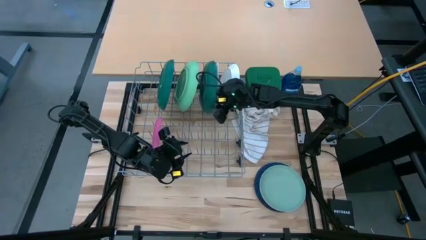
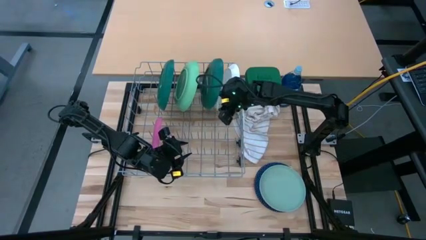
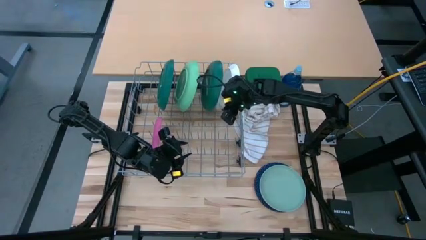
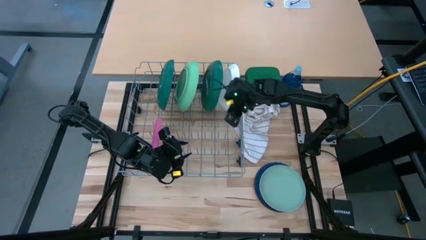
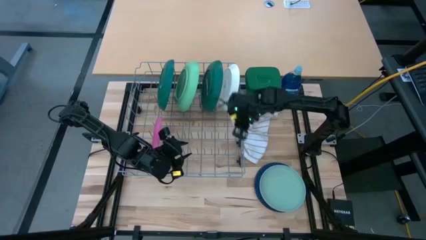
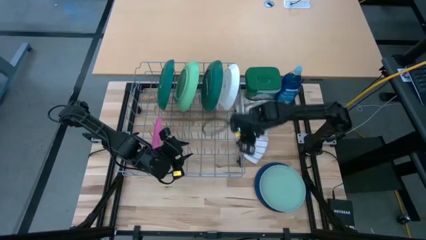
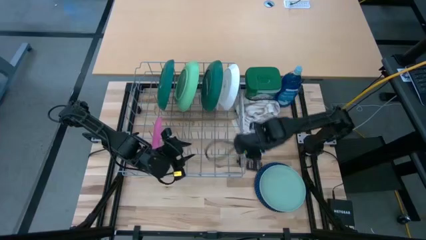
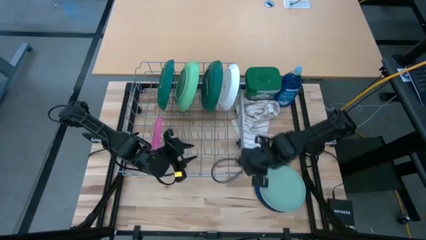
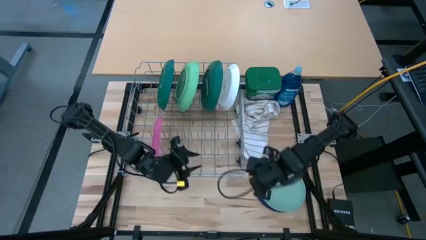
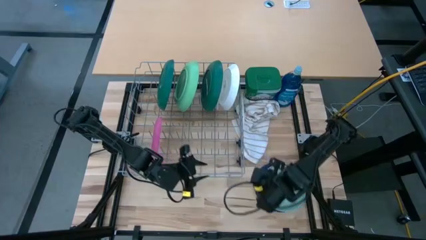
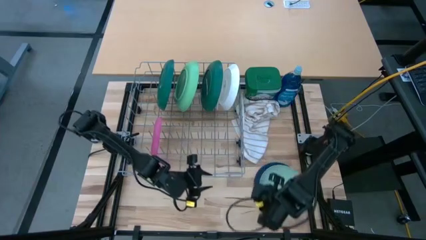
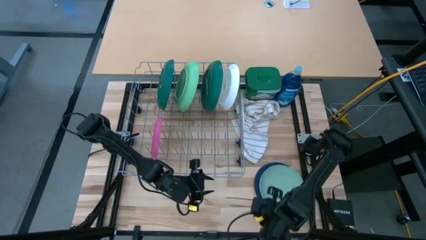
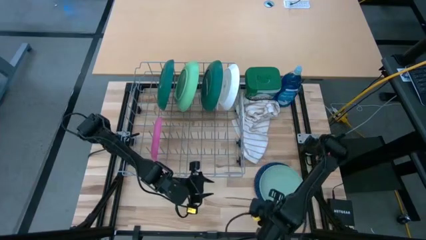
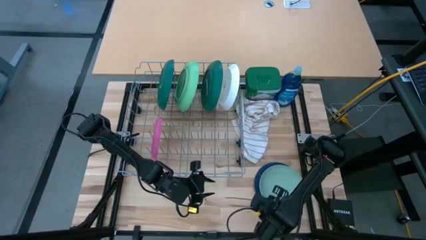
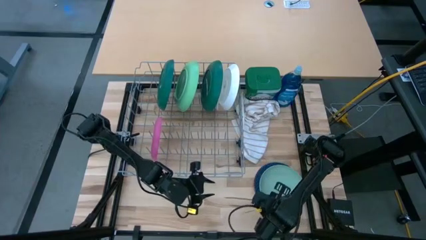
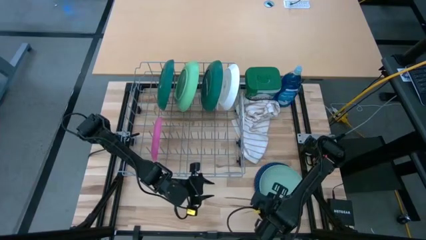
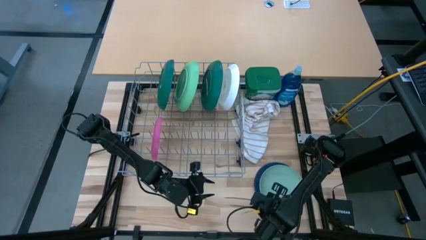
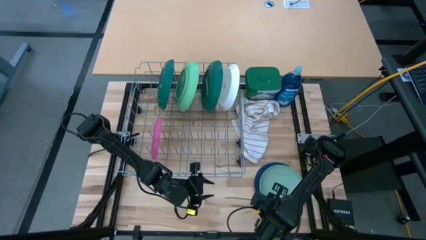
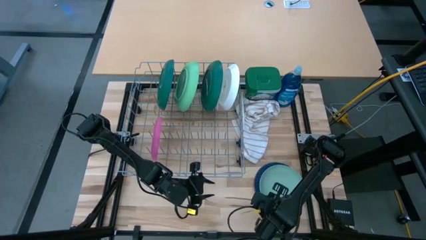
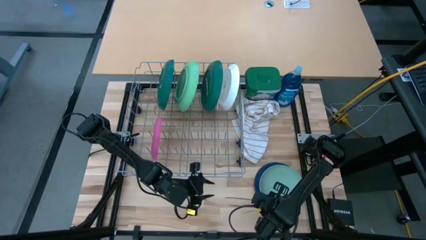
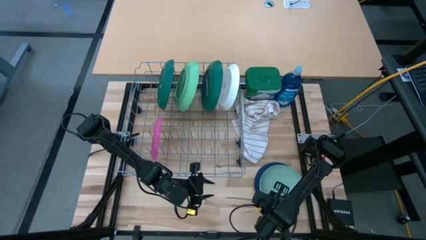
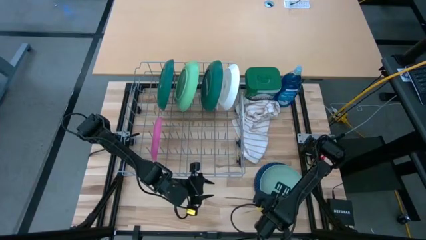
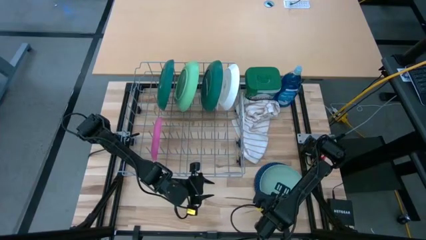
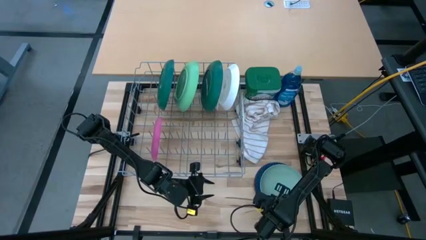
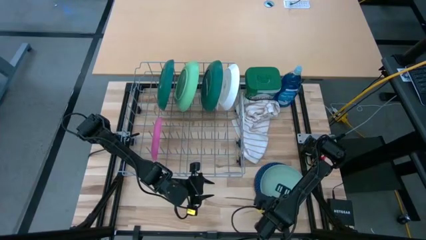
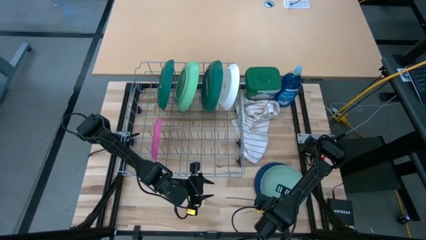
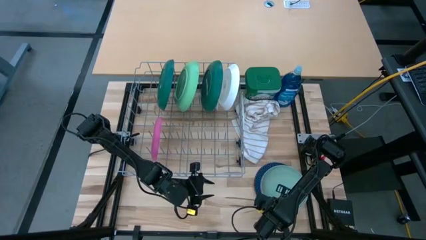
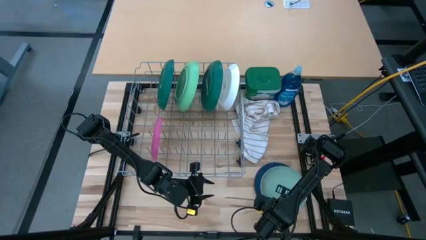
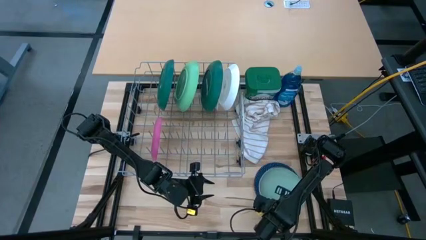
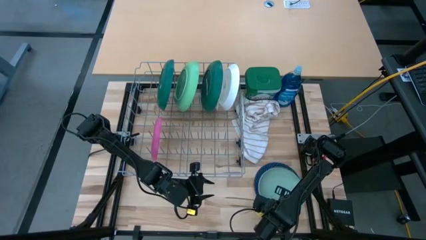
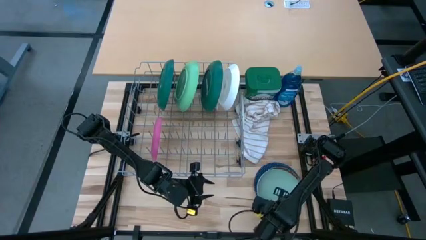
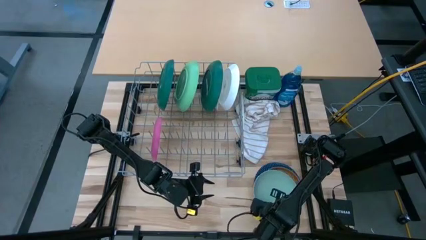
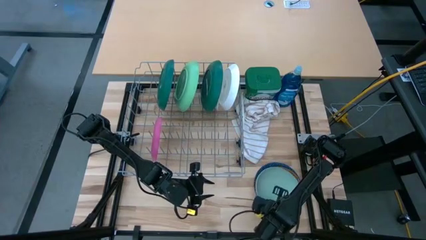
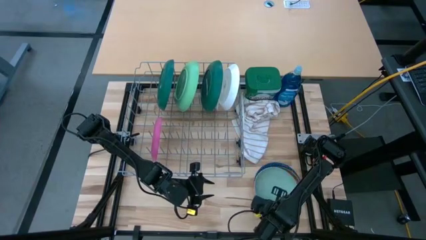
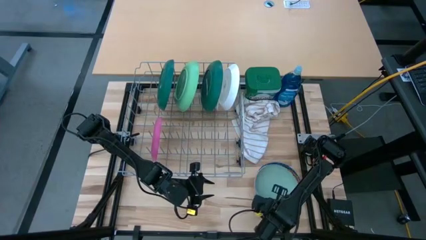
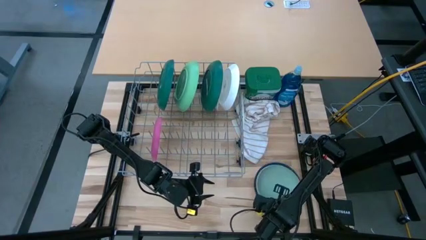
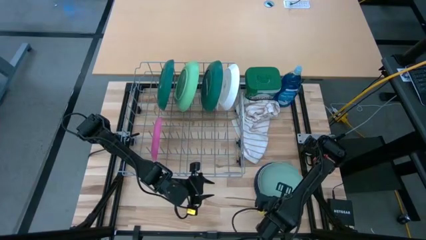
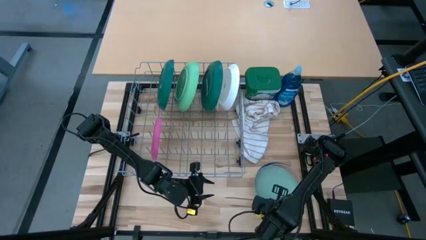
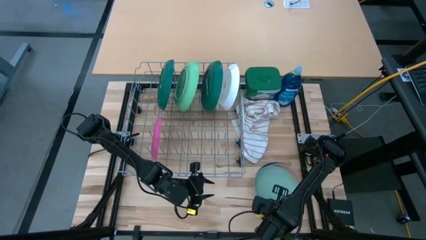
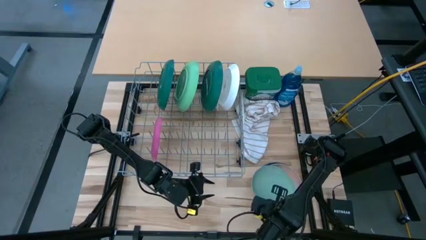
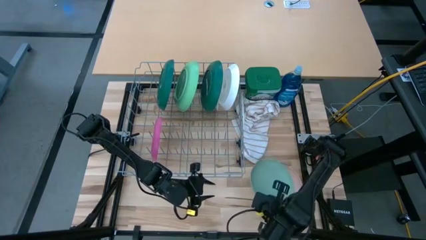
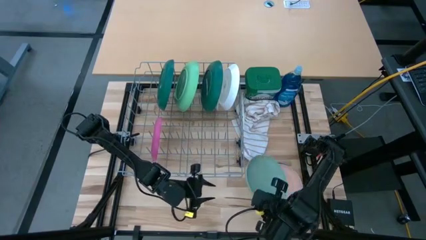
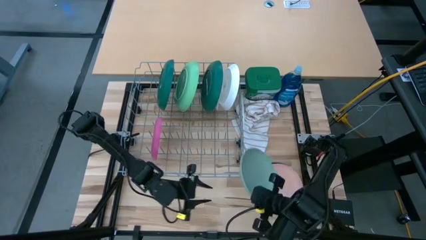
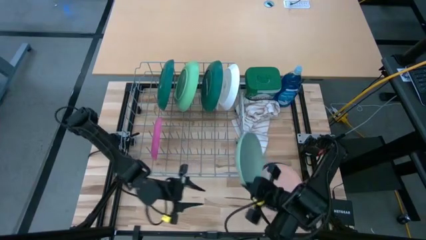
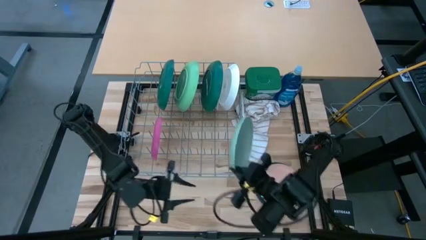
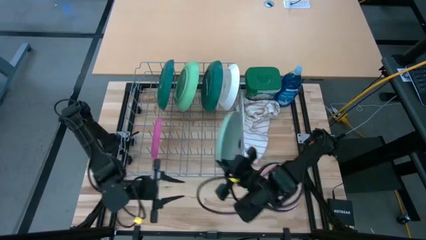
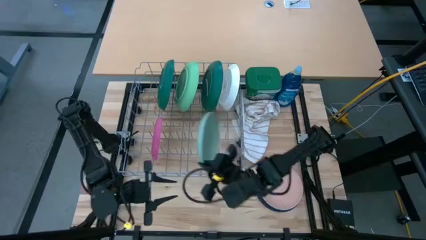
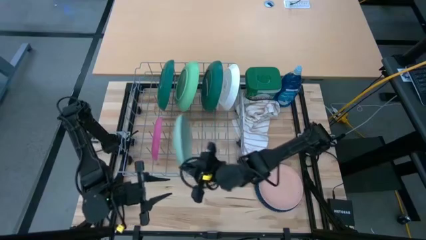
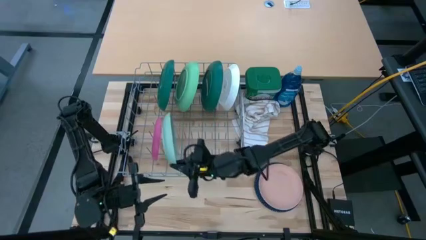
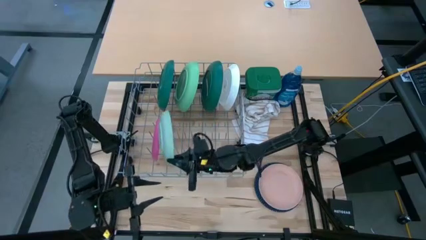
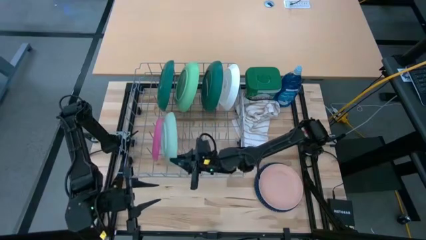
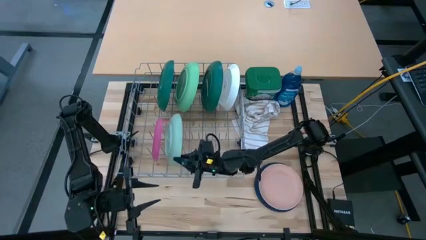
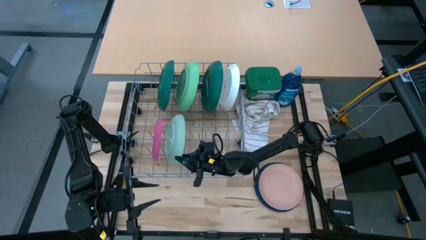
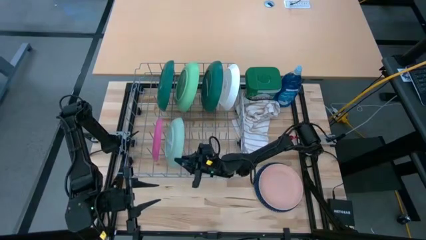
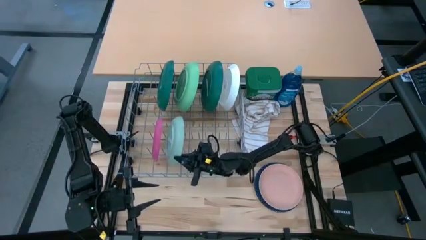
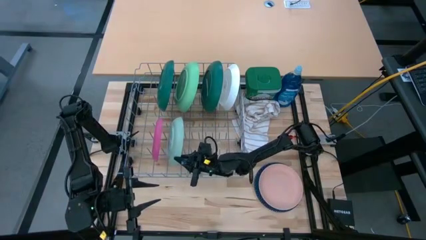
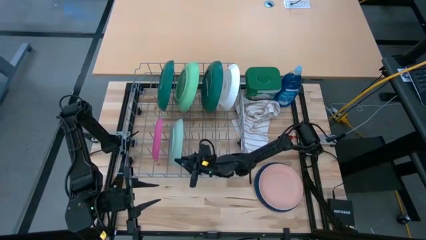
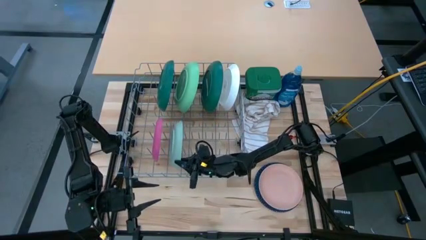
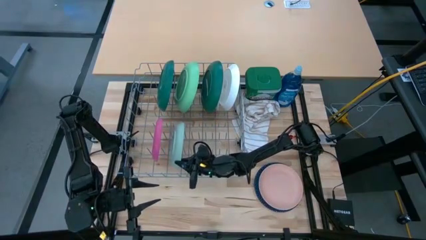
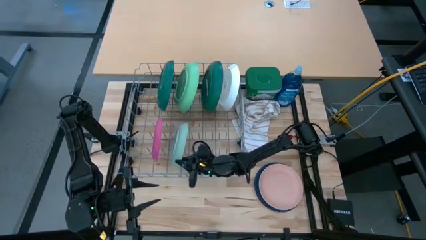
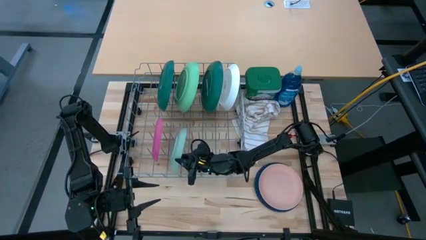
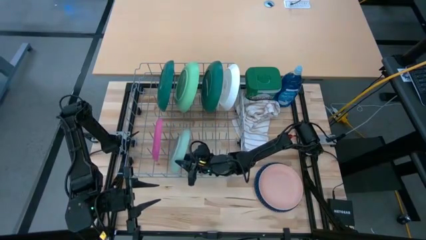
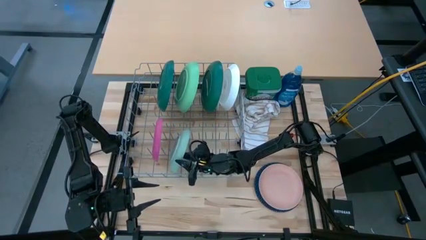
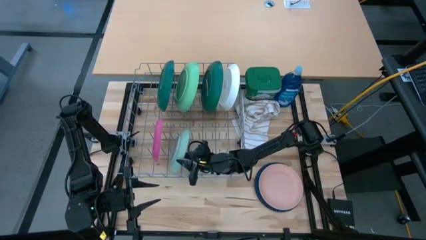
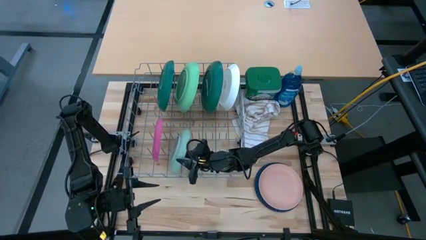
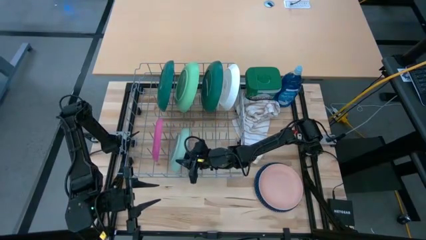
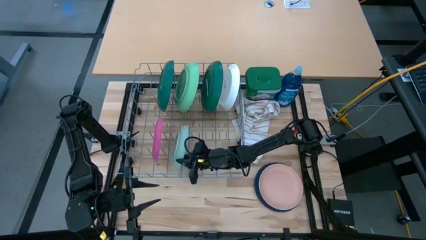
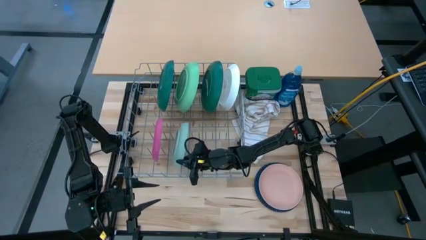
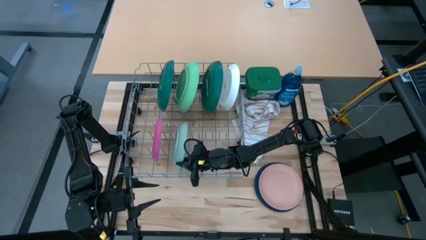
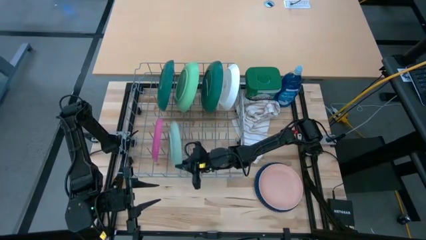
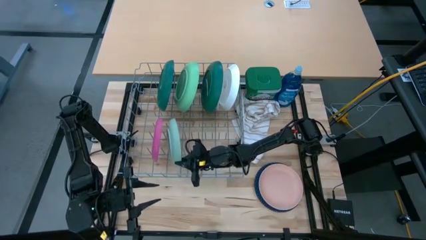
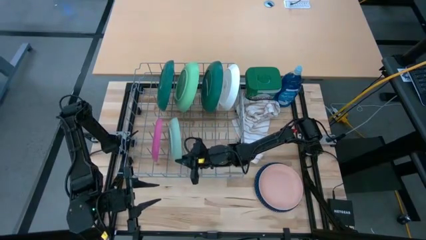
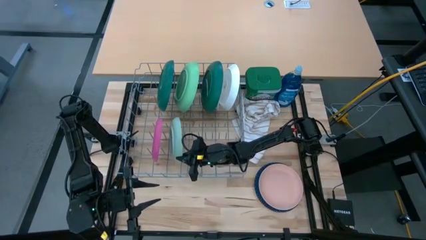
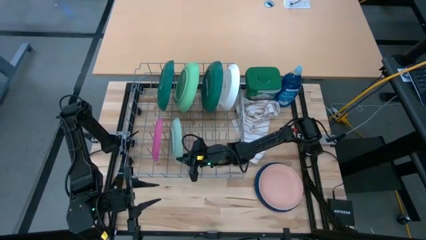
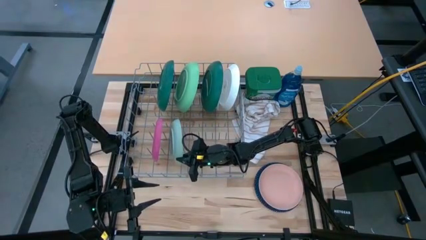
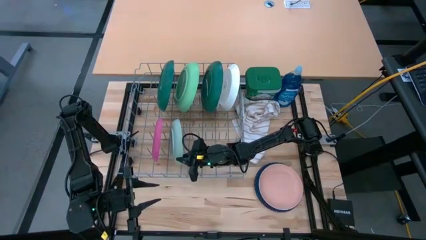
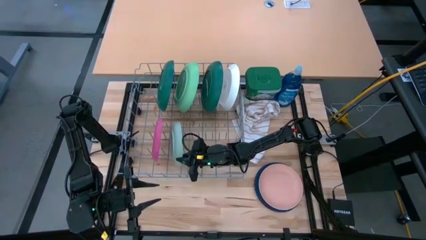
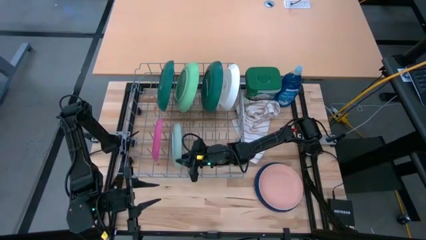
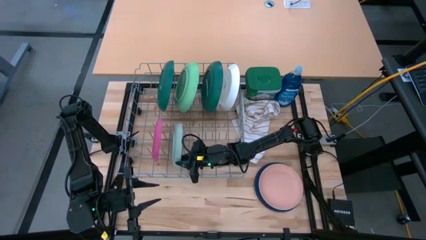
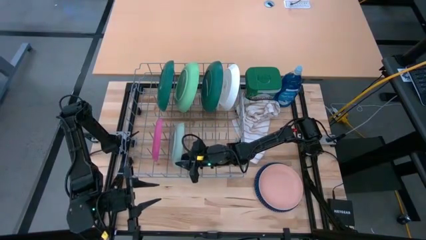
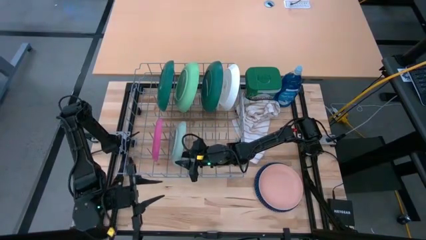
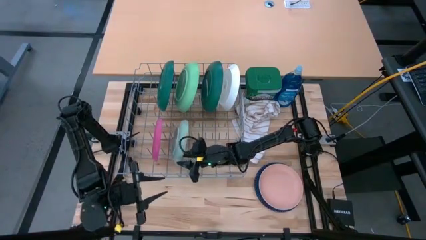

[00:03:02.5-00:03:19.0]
Task: Sort dishes
Put the mint green plate in the dish rack
